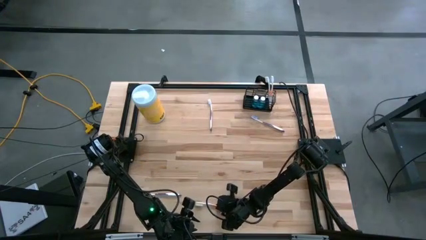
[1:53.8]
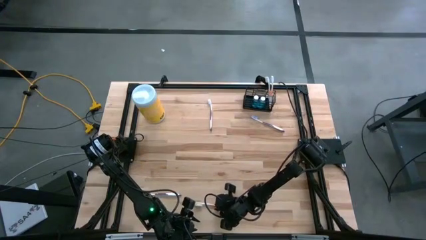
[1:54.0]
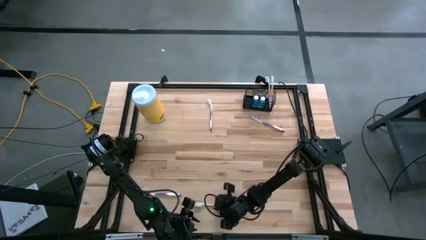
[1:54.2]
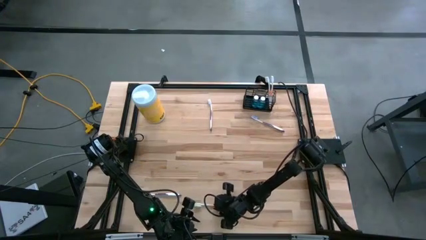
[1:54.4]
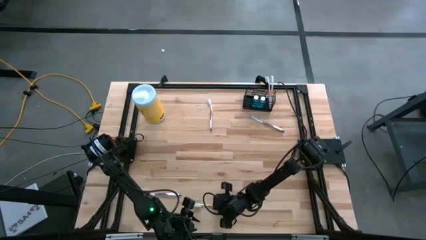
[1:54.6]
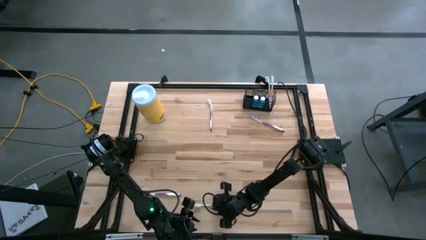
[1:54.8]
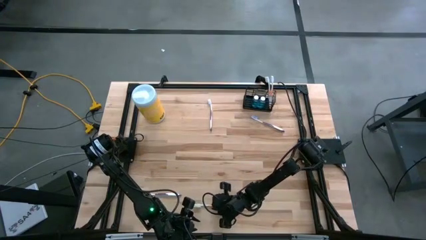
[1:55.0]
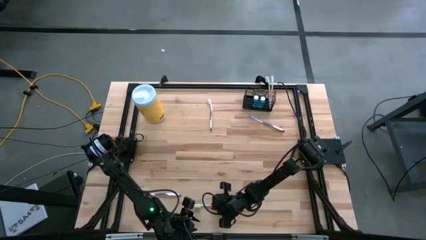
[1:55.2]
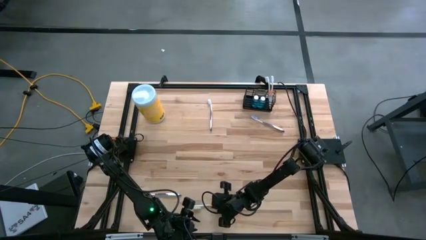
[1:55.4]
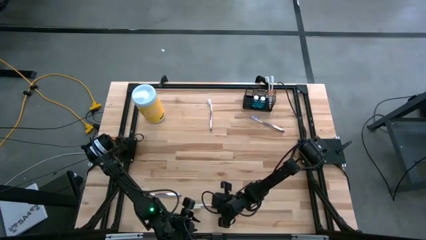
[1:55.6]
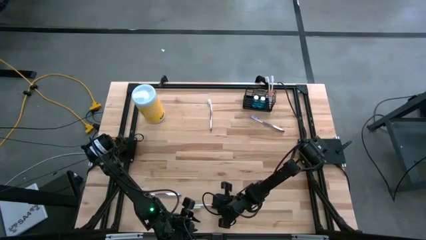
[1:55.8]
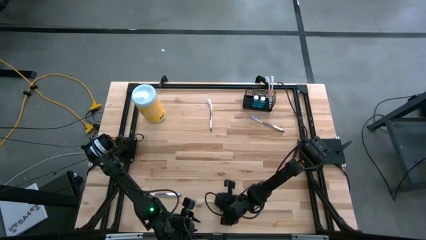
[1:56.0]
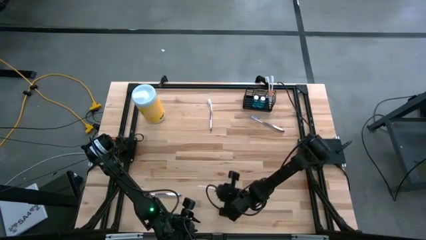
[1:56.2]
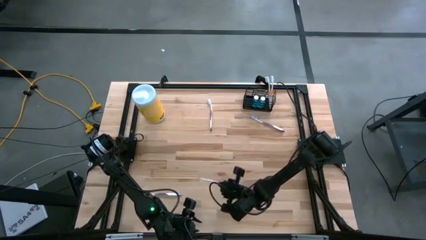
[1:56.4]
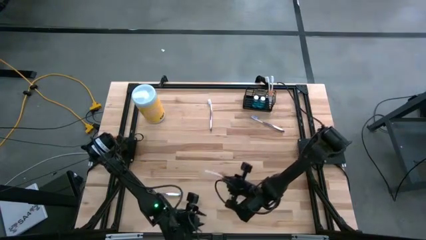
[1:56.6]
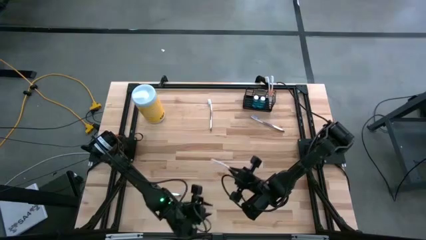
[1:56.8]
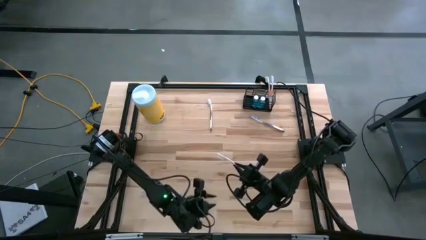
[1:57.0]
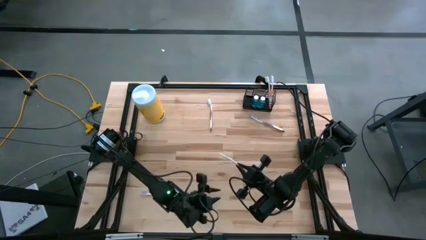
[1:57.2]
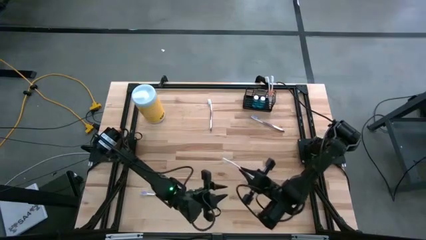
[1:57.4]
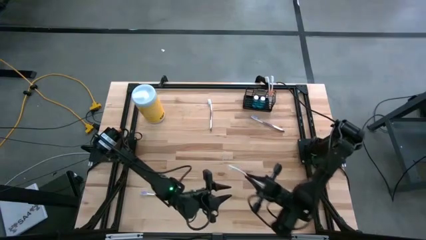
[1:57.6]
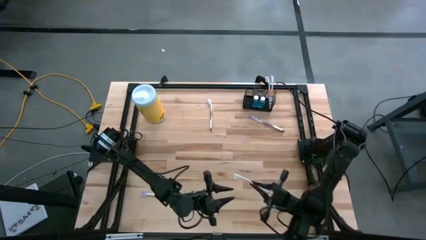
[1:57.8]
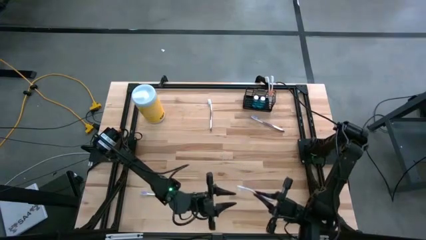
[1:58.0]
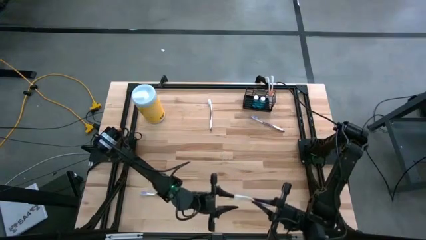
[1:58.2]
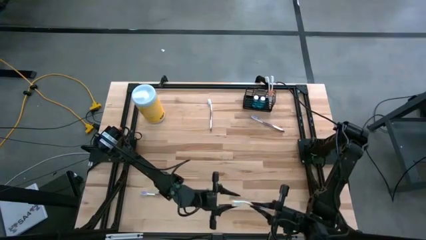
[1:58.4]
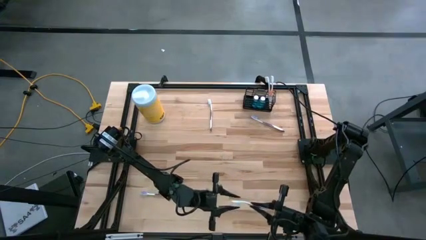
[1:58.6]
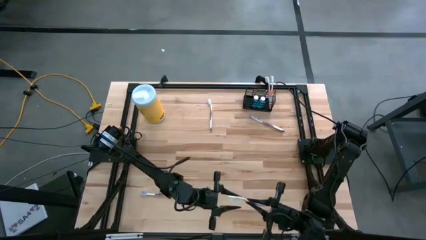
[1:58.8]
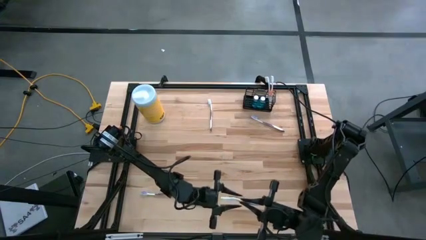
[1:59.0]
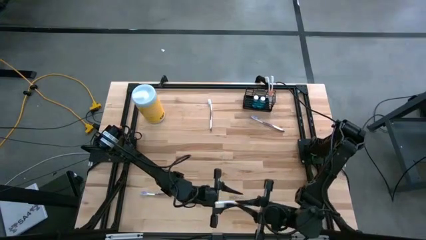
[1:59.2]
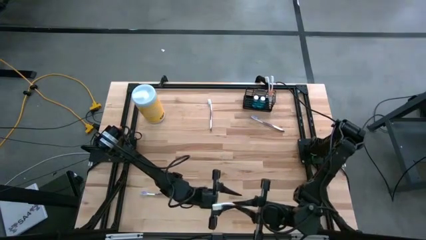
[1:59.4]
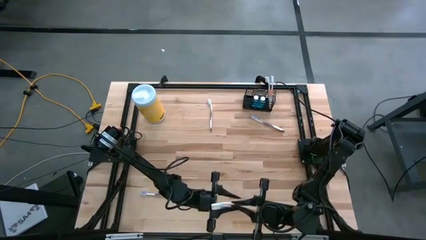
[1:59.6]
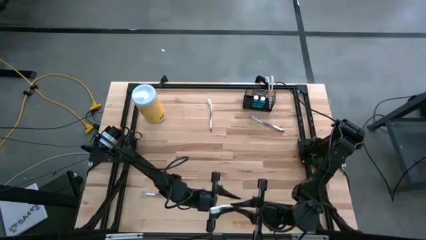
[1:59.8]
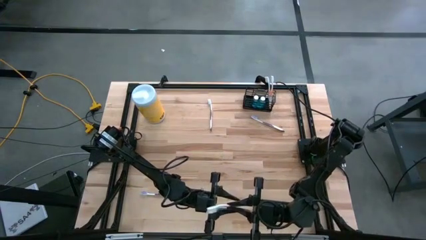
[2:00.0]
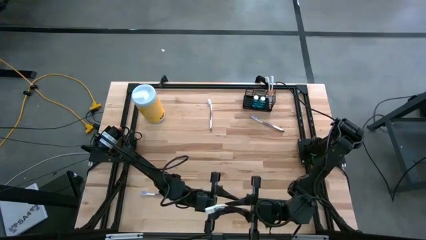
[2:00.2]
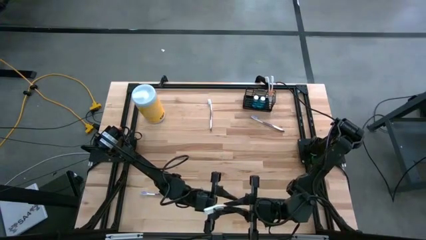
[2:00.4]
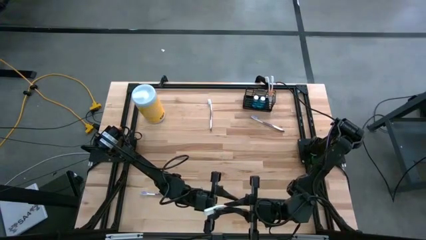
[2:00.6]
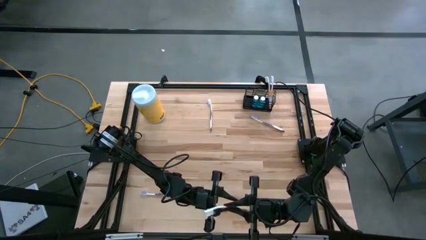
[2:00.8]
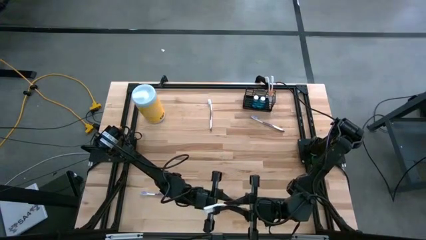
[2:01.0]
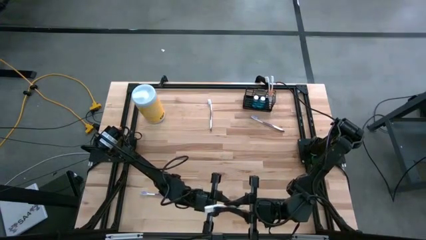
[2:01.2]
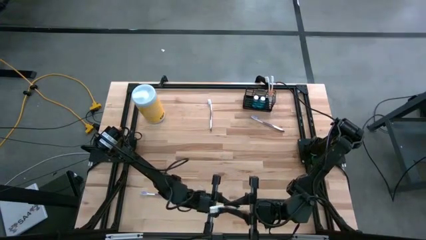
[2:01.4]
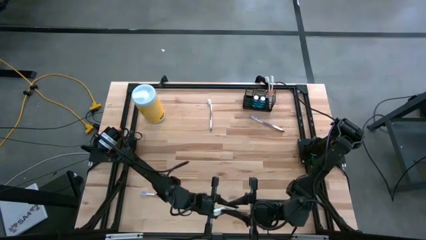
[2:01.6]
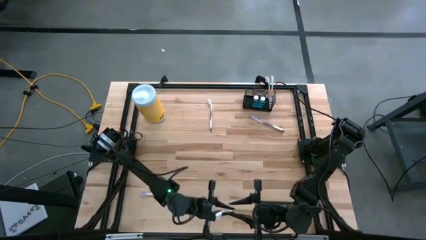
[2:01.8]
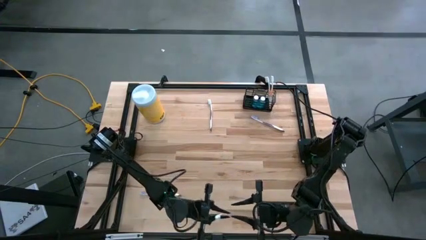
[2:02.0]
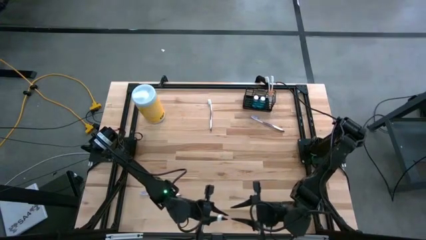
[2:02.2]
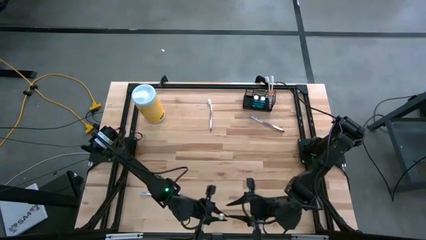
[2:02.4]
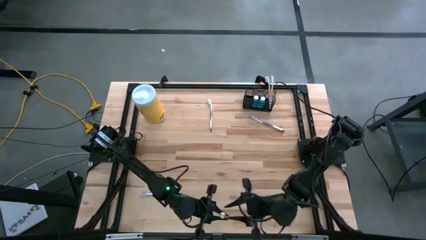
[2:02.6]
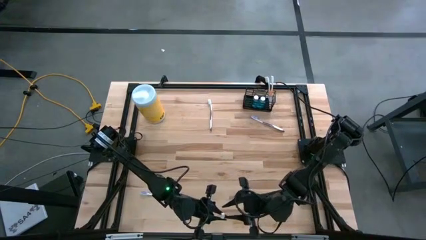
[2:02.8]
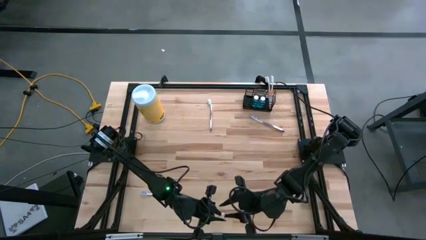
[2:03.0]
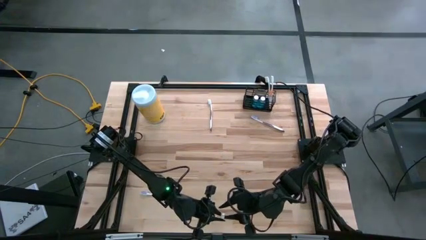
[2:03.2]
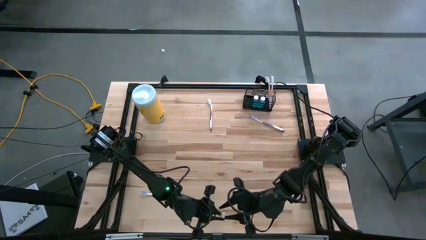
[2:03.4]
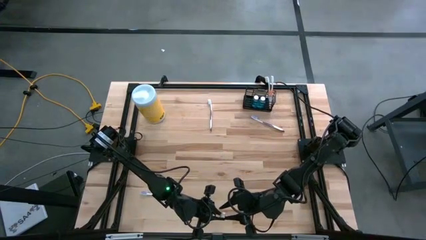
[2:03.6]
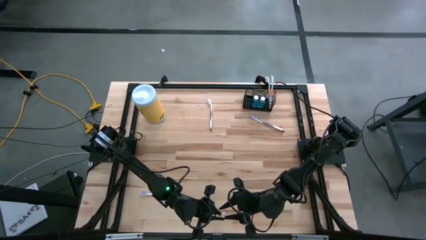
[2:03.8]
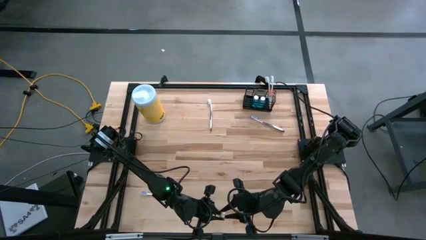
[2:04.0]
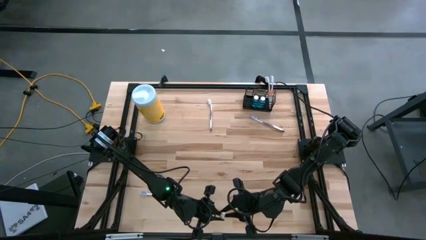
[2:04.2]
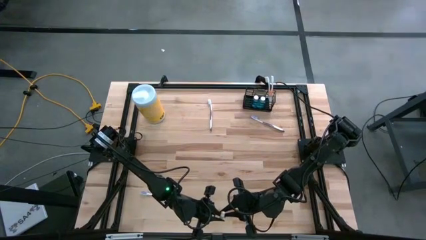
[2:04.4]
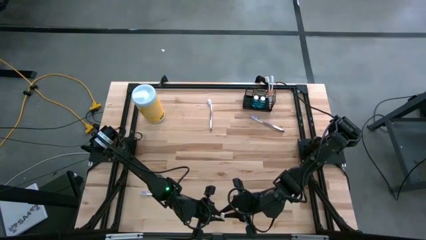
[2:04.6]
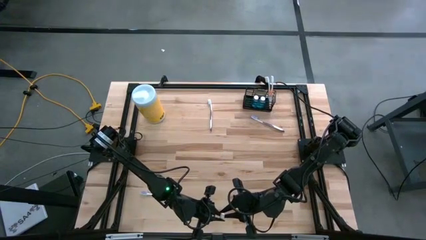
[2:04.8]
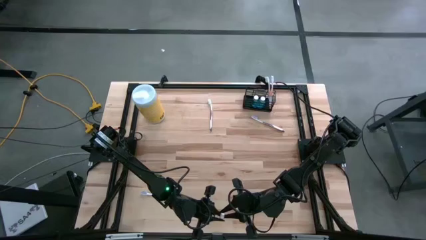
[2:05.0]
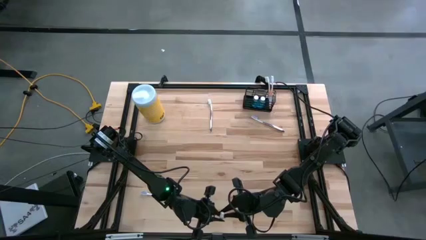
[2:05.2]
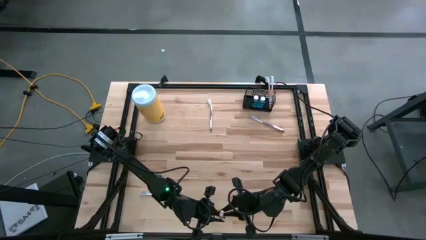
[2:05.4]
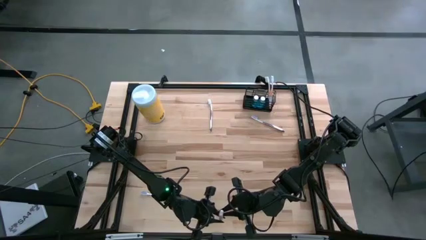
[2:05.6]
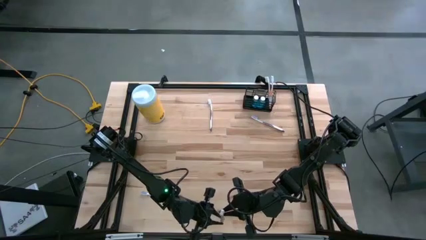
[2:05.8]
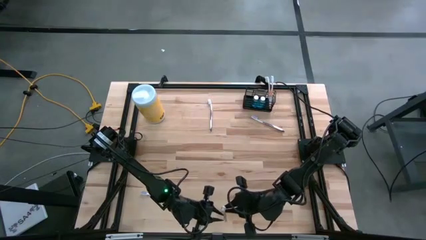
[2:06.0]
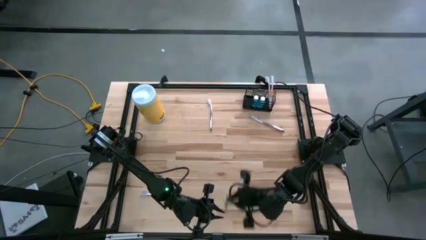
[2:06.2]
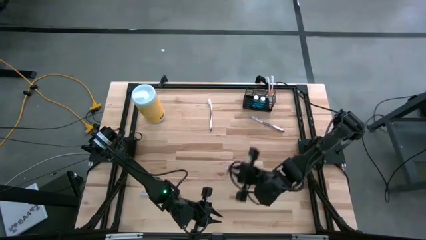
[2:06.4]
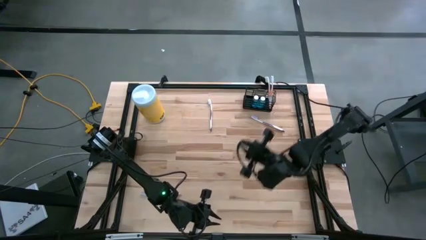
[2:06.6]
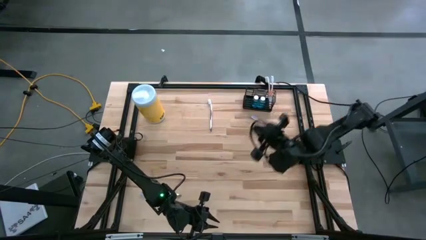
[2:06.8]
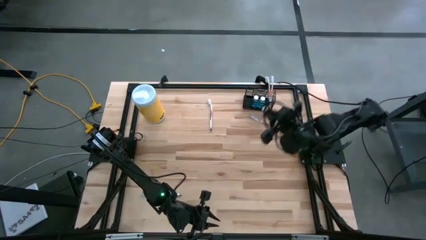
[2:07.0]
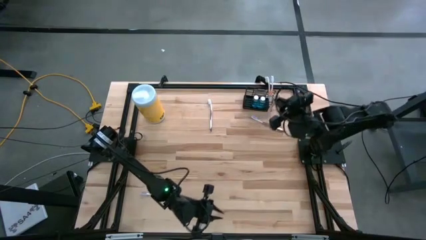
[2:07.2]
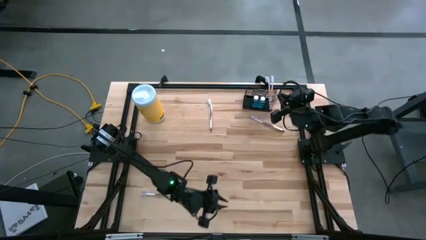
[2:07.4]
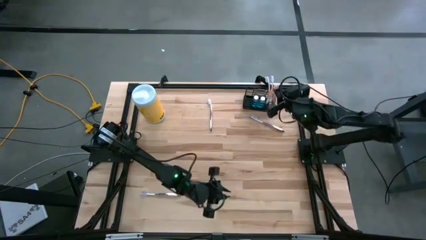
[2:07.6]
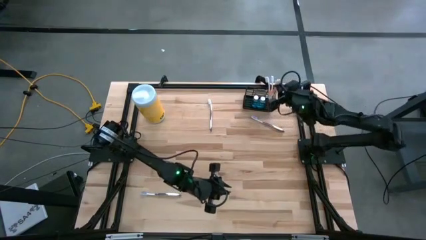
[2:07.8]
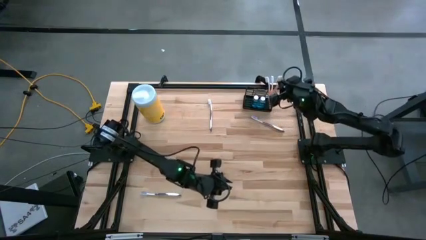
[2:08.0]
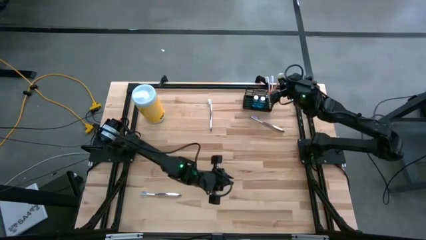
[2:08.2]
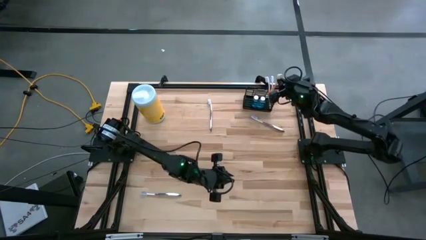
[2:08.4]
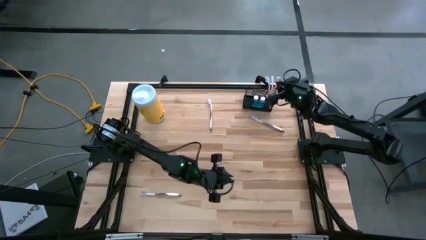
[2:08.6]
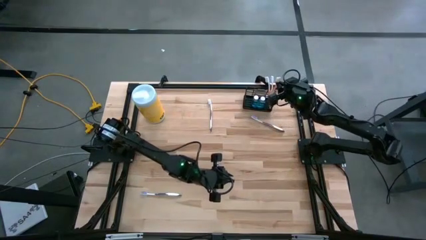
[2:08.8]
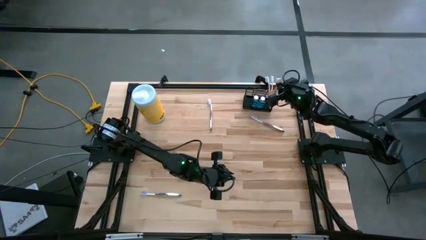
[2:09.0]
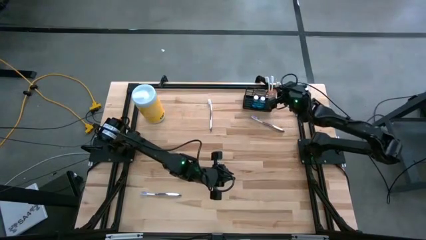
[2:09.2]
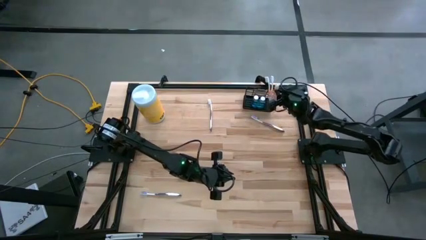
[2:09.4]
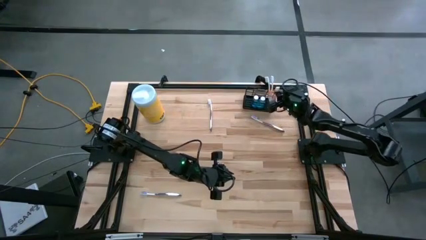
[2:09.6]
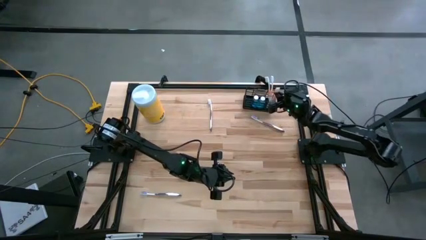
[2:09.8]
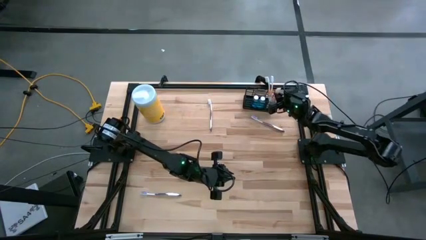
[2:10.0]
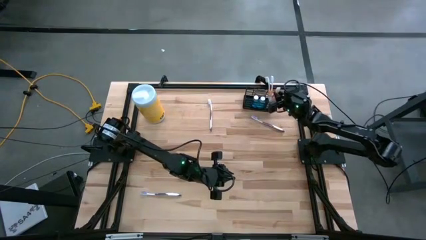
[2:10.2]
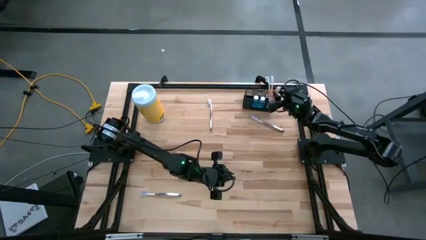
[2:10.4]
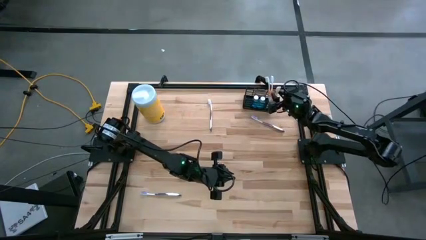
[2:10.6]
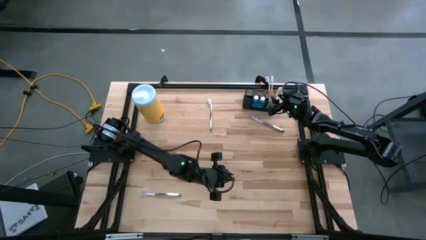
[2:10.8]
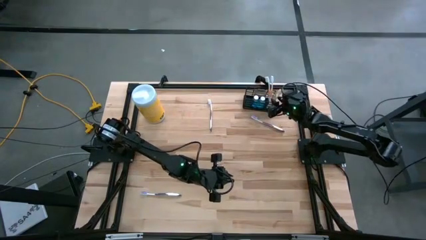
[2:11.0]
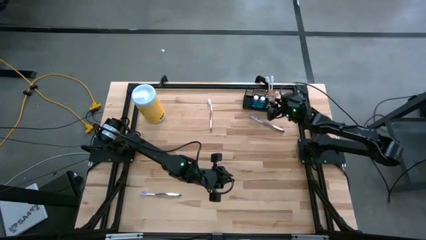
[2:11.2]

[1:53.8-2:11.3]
Task: Pick & Place toothbrushing station
Put the orange toothbrush into the black wire organizer
